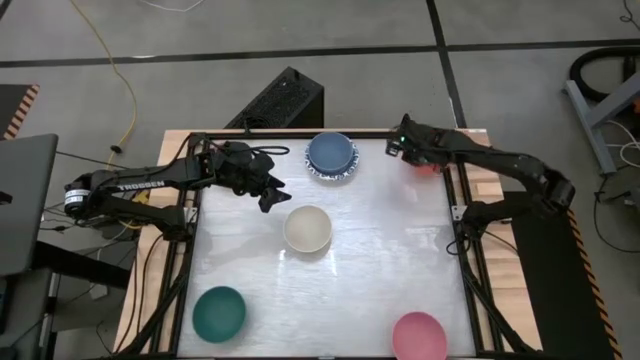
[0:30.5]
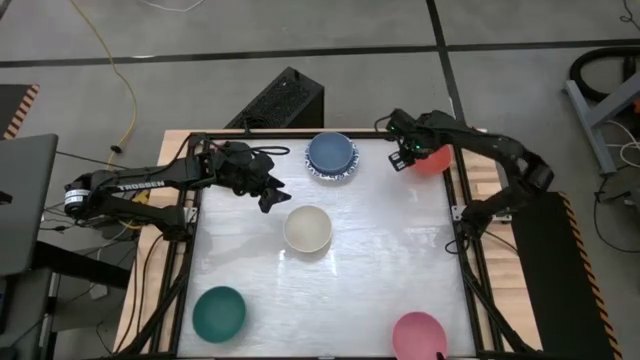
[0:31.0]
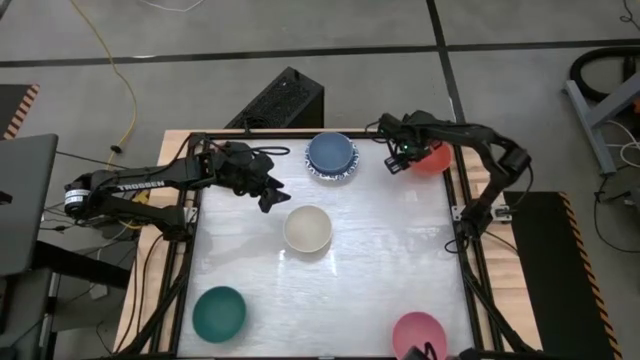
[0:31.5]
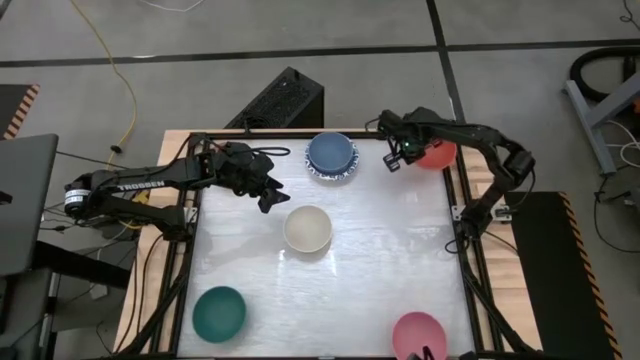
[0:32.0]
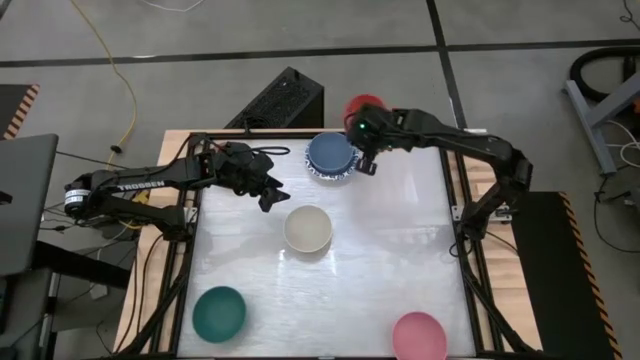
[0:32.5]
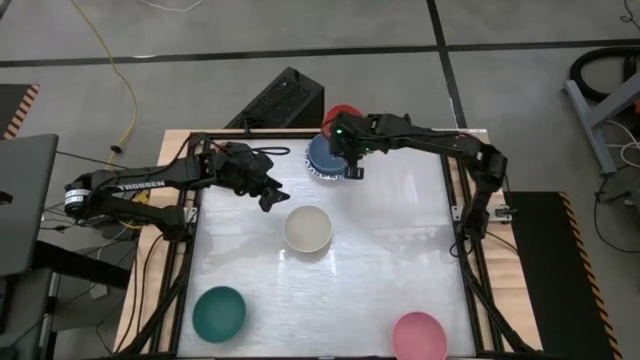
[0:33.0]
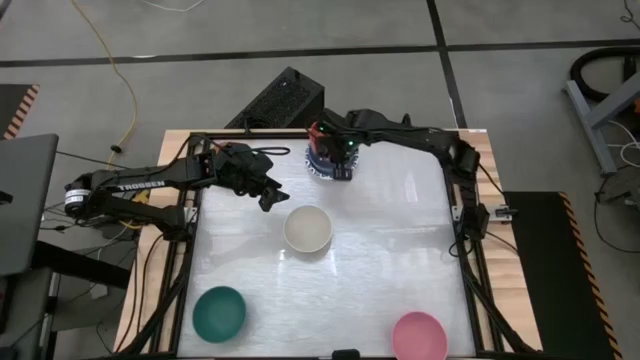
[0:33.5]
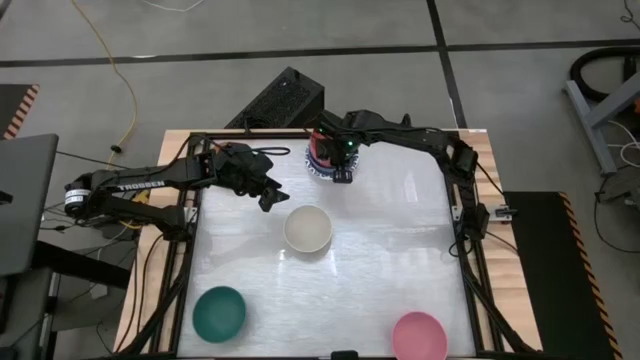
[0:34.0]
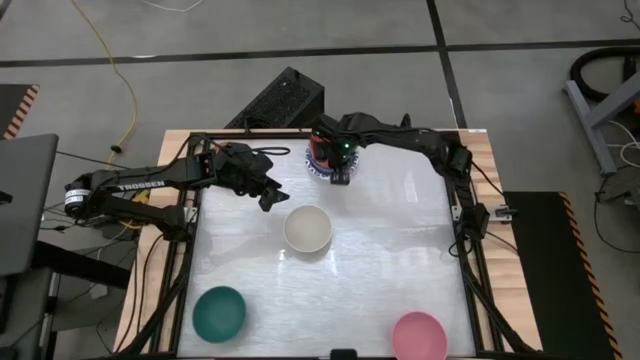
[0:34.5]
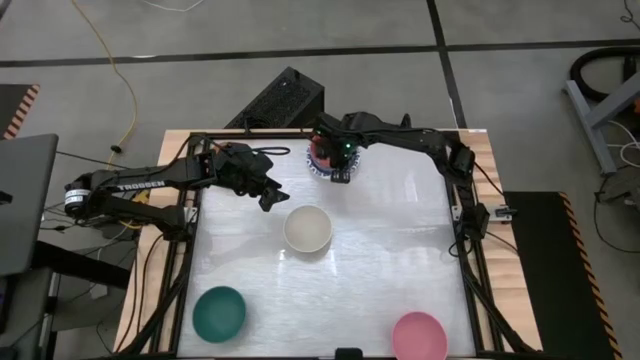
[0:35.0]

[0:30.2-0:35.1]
Stack the orange bowl on top of the blue bowl

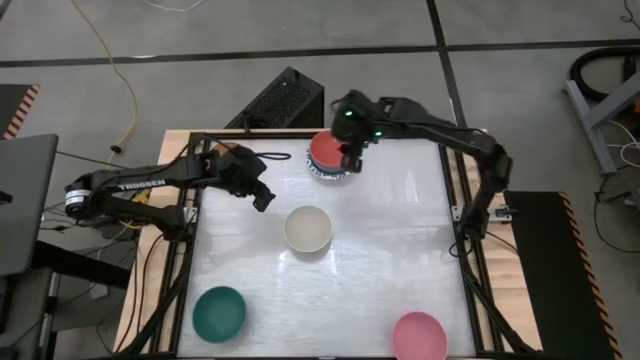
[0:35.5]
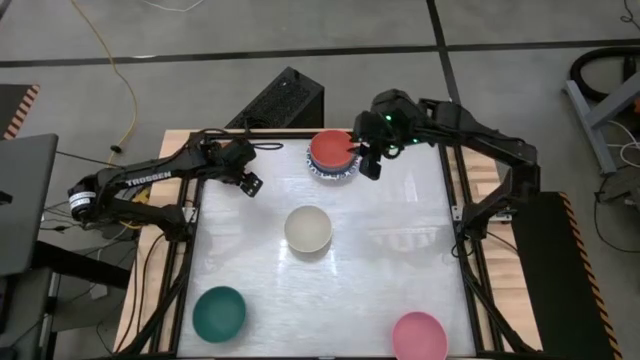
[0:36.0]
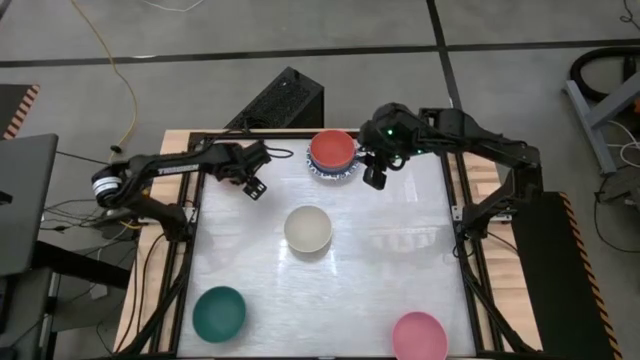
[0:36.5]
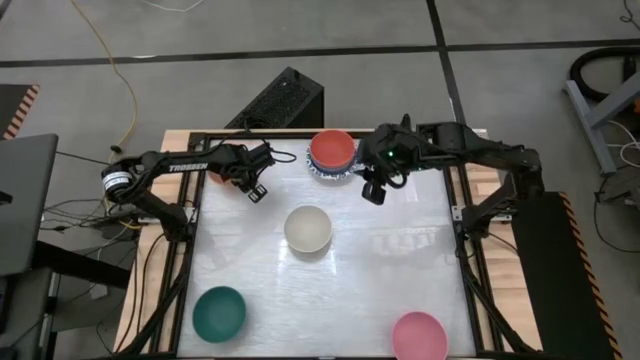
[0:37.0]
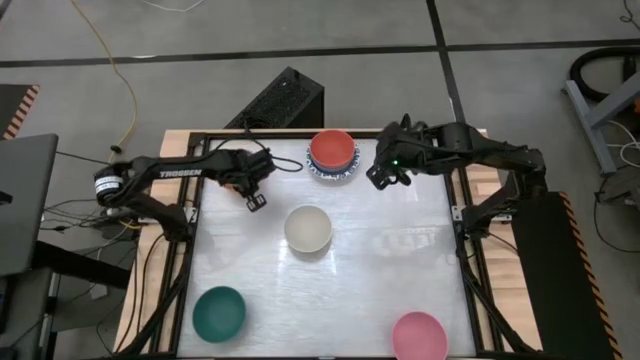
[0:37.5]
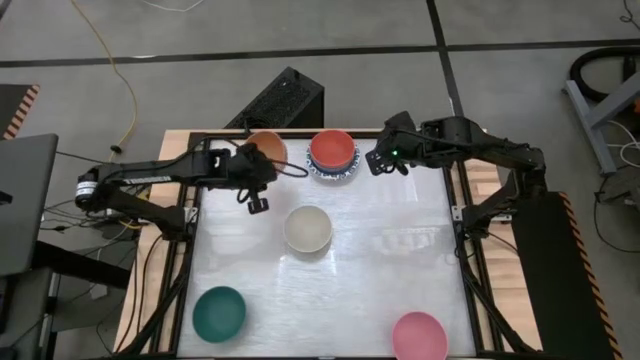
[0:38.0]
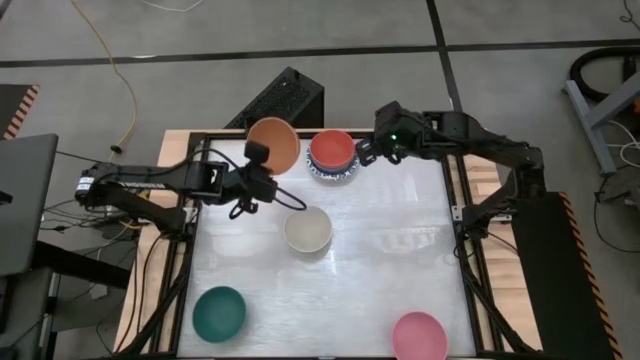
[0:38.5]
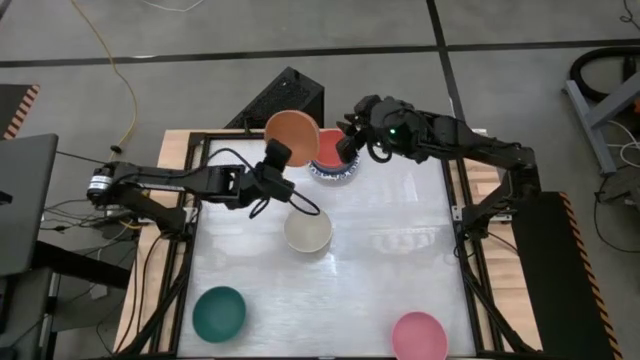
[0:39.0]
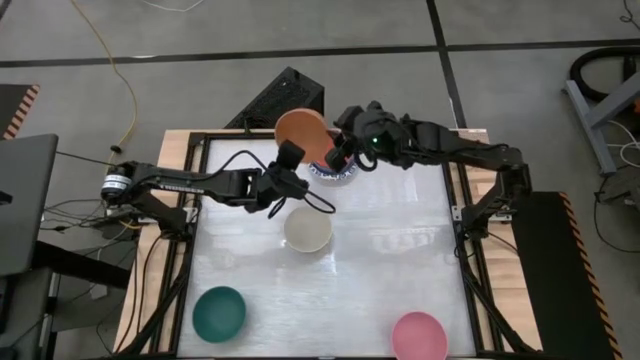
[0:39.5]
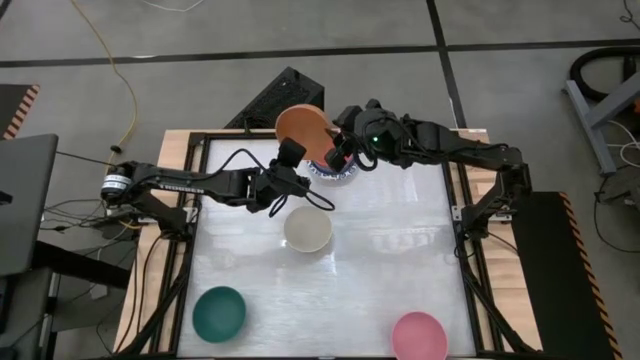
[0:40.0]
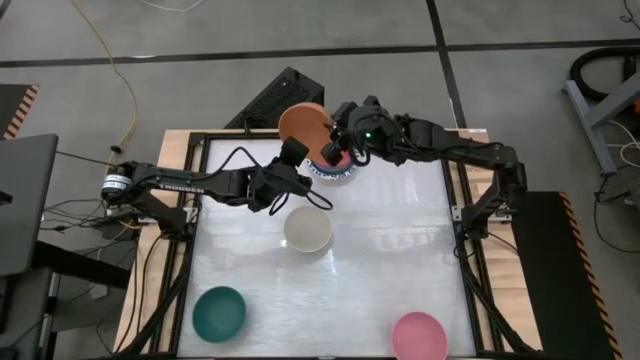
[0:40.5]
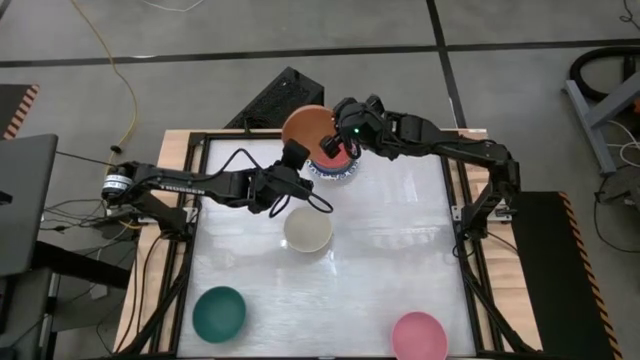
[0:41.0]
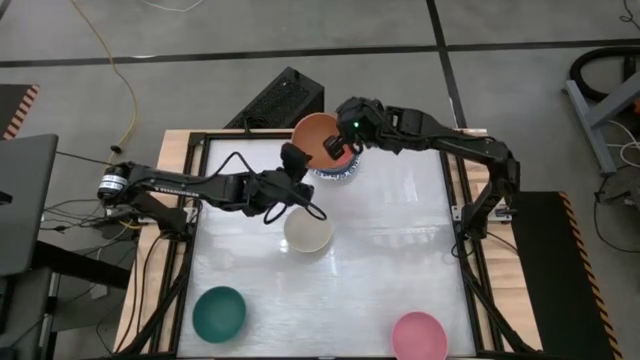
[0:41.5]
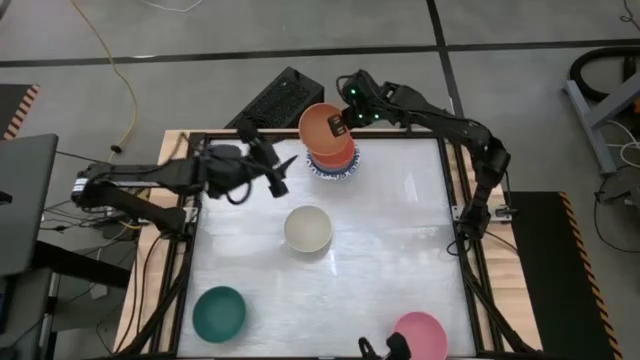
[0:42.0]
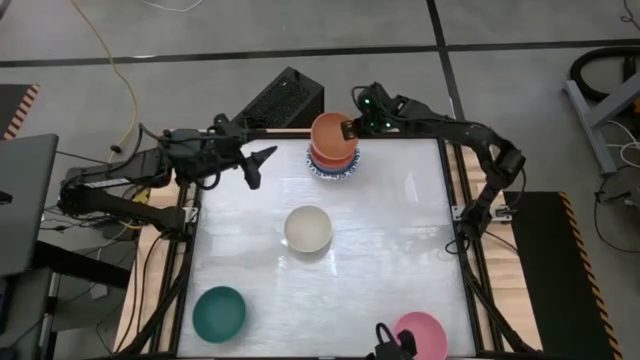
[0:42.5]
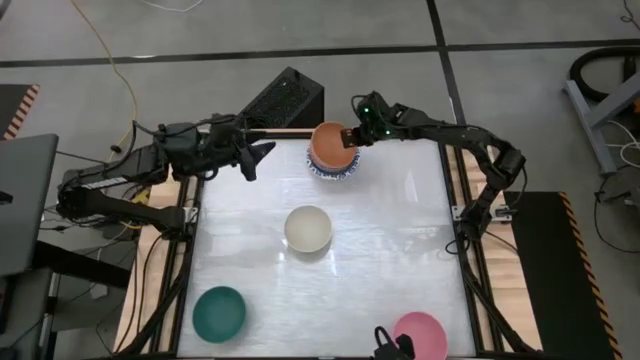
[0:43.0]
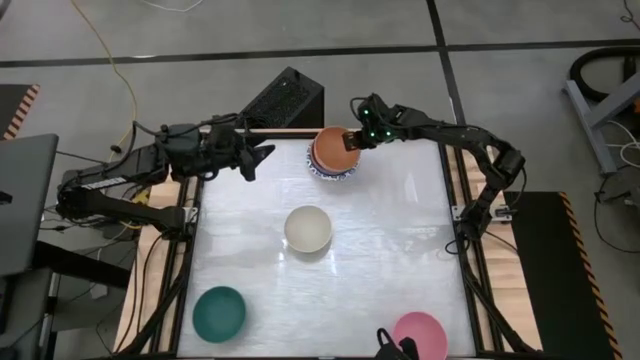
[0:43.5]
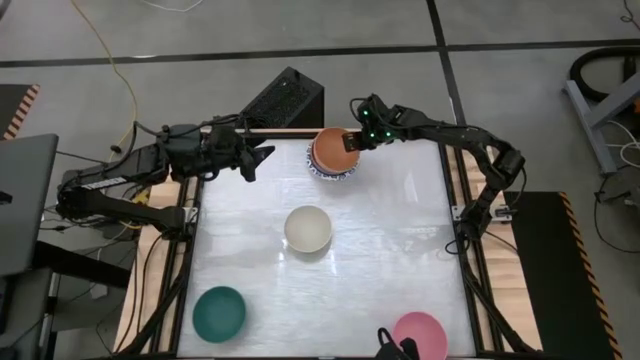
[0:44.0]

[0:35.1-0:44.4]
Stack the light orange bowl on top of the orange bowl

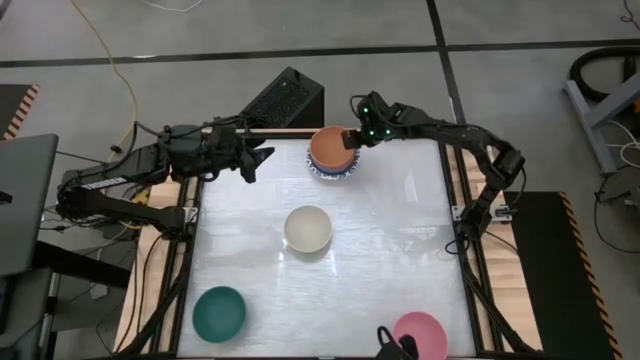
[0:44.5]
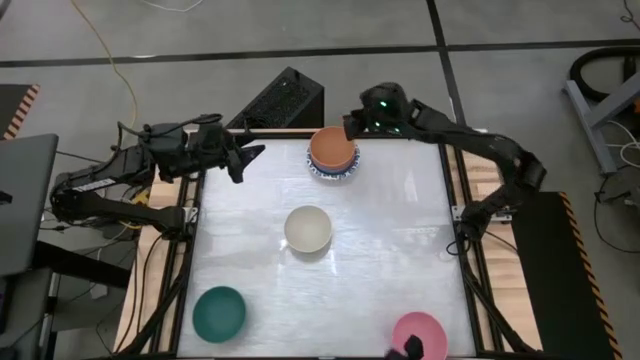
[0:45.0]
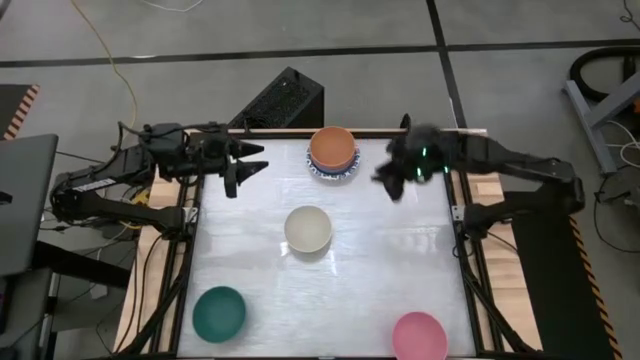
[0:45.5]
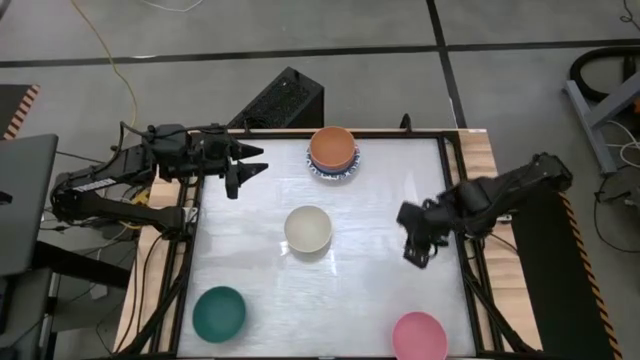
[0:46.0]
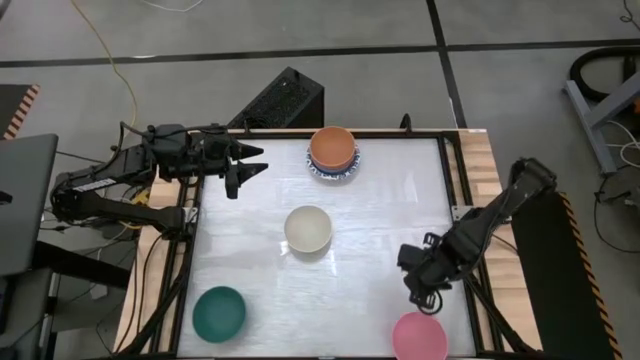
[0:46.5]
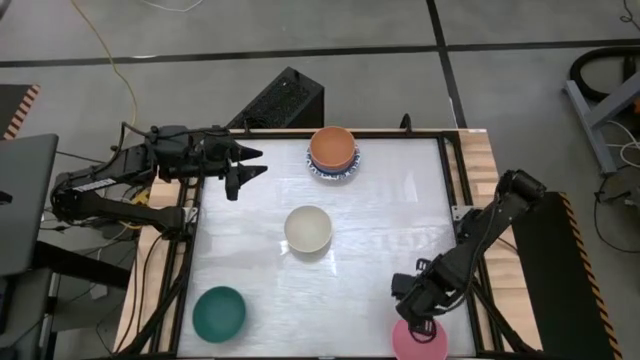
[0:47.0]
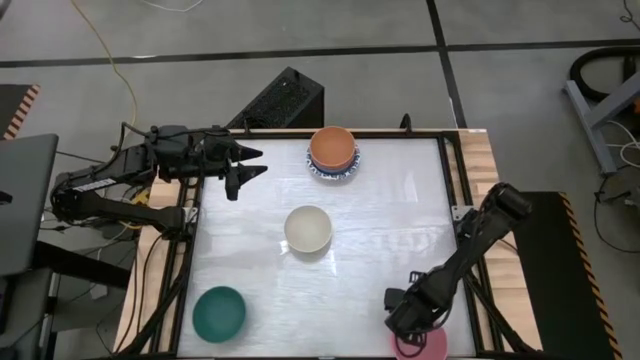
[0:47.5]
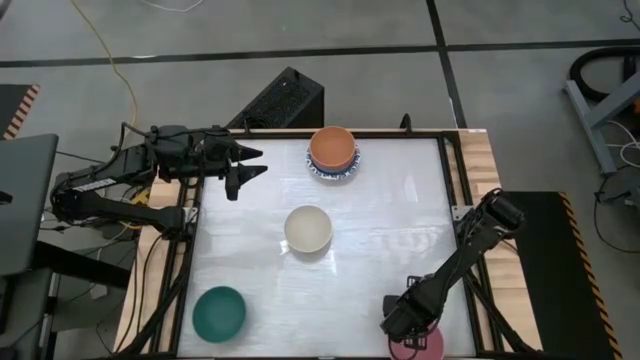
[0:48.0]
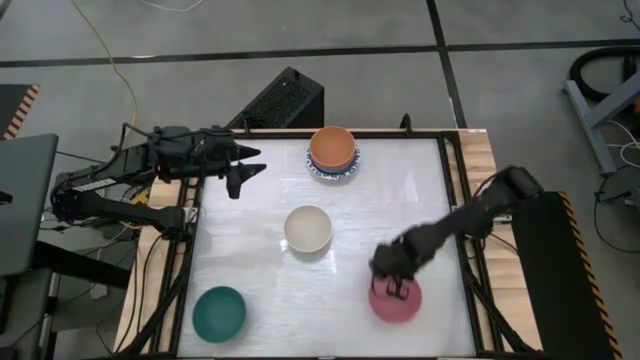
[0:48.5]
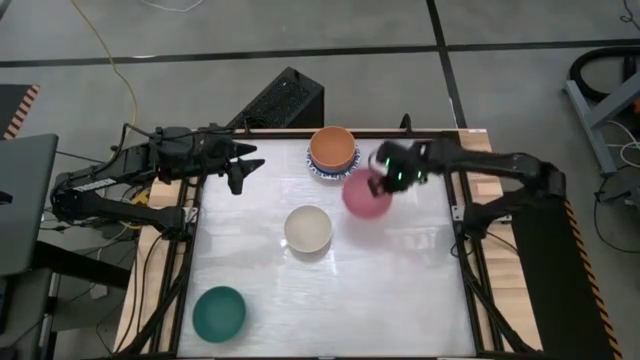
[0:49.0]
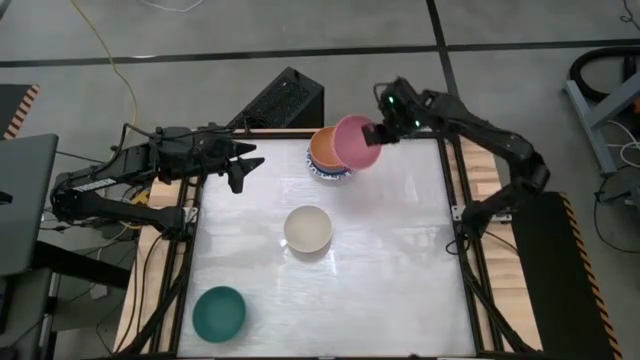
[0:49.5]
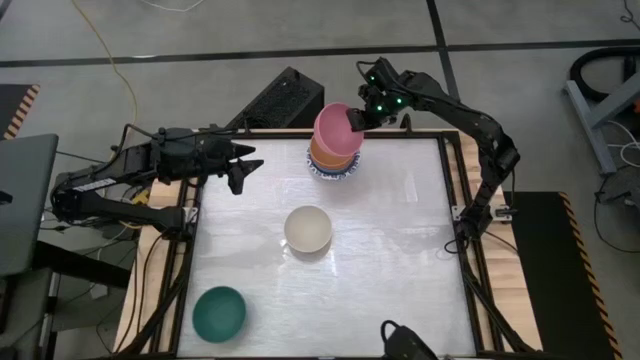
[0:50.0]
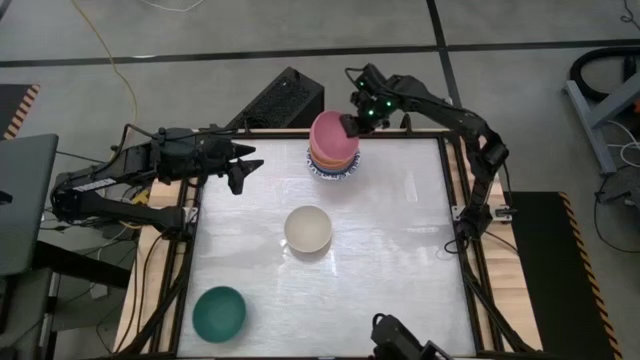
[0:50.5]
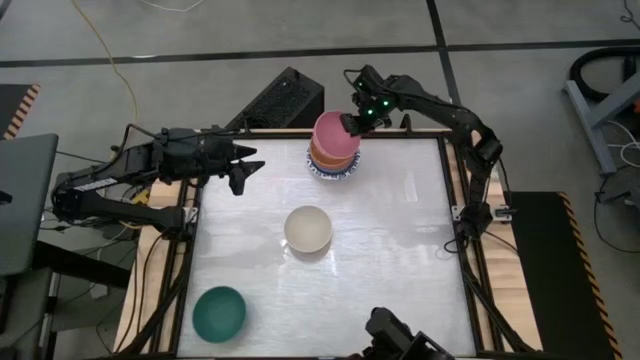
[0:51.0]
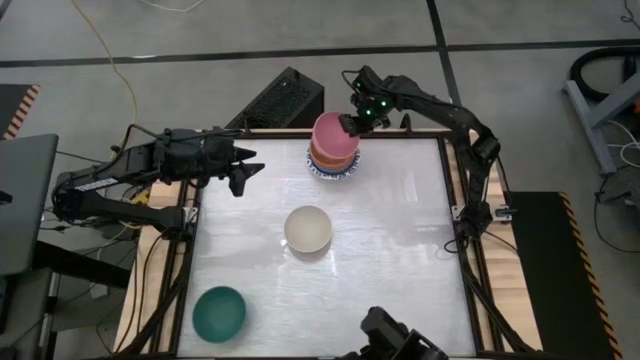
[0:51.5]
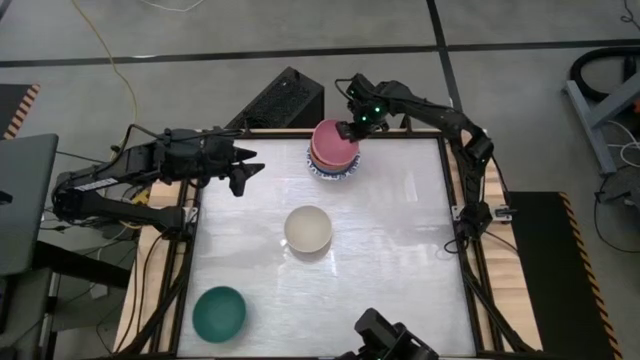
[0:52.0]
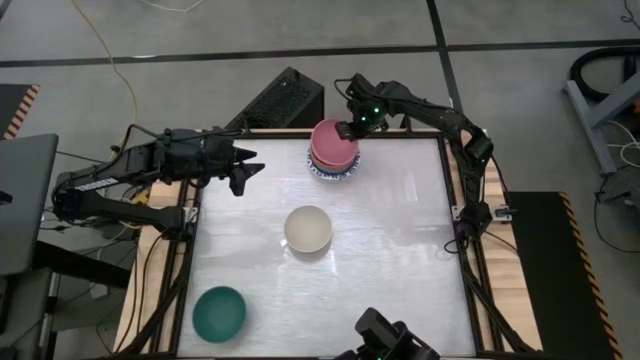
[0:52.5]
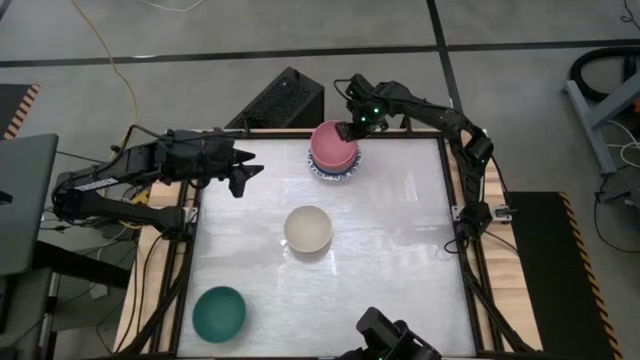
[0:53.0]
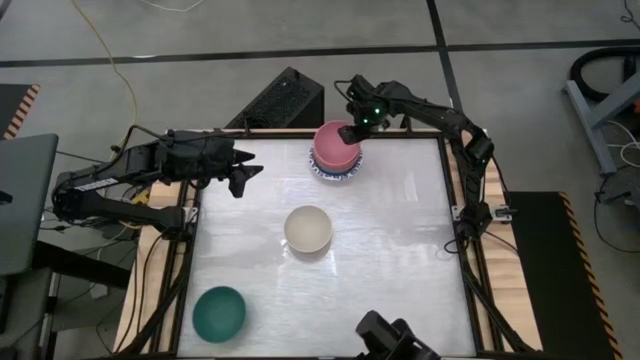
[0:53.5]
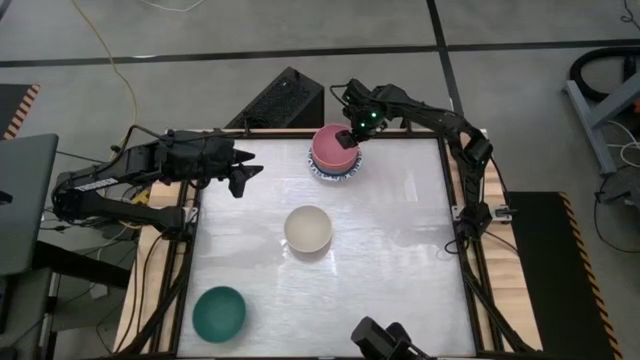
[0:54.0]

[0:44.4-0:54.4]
Stack the pink bowl on top of the light orange bowl
